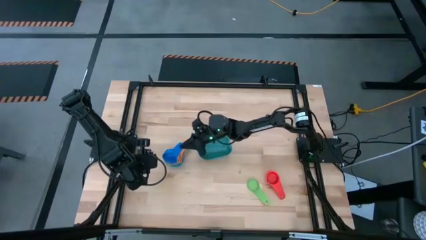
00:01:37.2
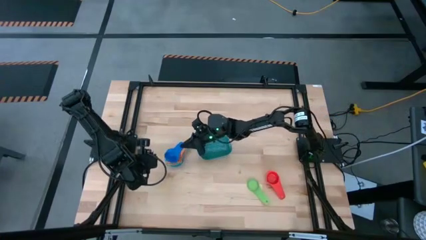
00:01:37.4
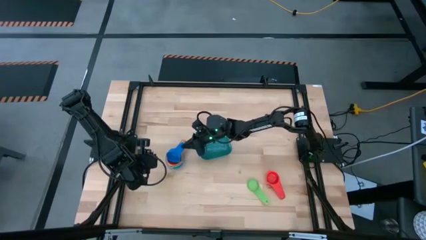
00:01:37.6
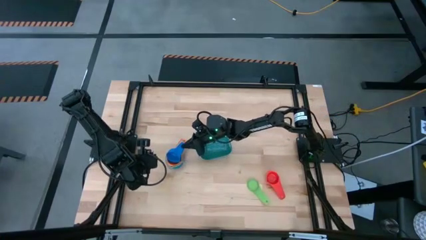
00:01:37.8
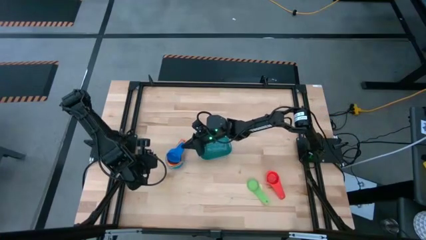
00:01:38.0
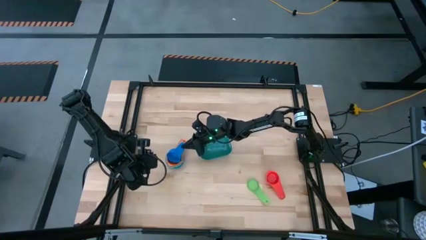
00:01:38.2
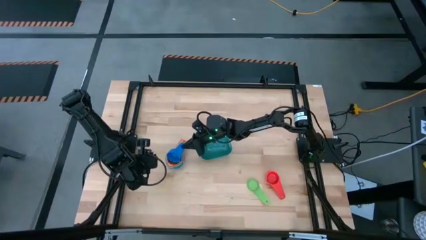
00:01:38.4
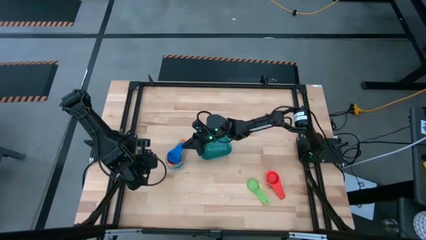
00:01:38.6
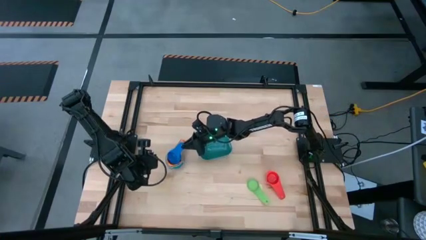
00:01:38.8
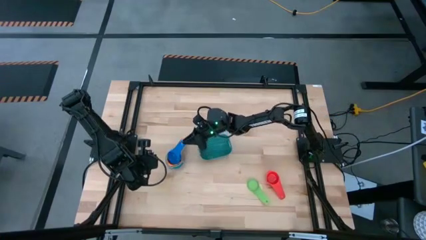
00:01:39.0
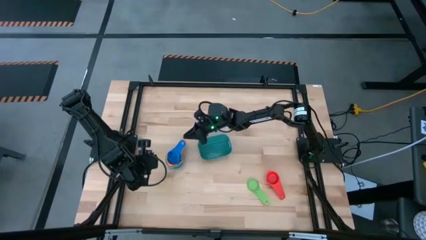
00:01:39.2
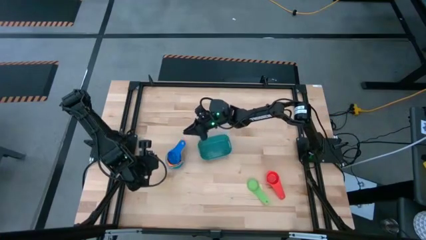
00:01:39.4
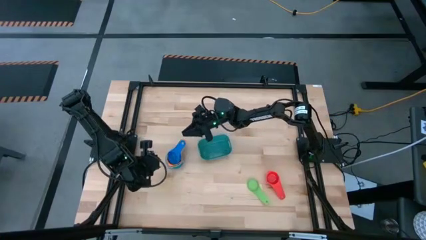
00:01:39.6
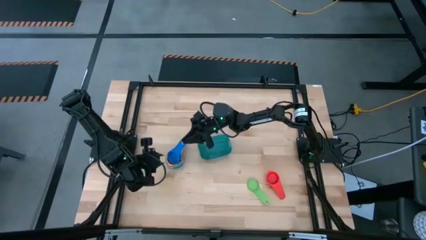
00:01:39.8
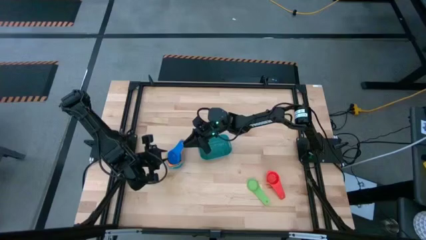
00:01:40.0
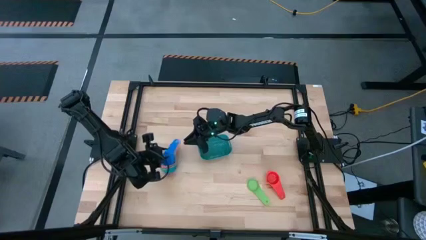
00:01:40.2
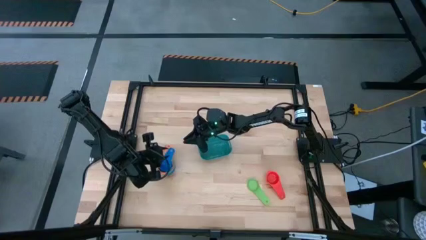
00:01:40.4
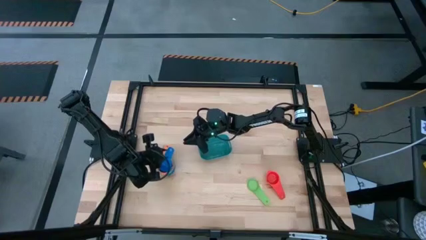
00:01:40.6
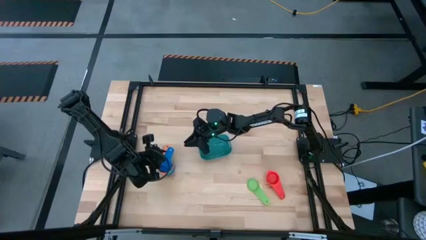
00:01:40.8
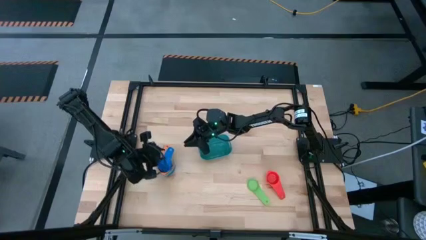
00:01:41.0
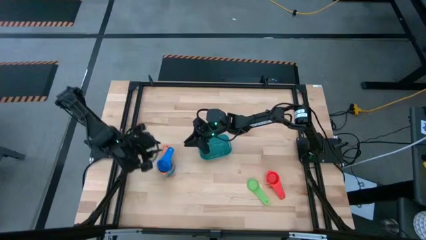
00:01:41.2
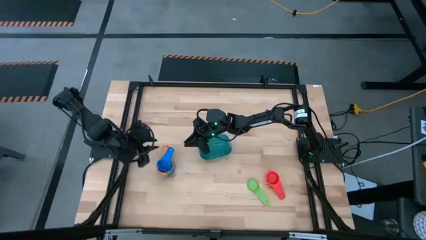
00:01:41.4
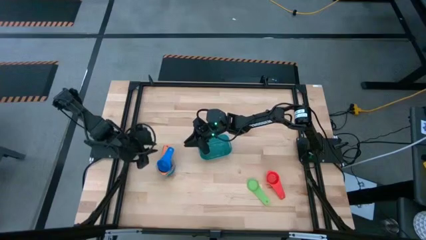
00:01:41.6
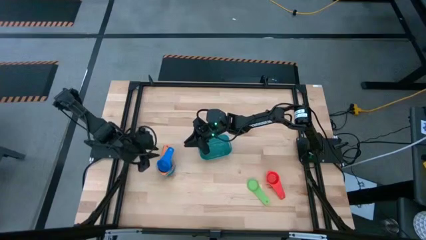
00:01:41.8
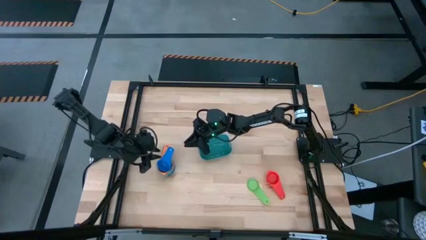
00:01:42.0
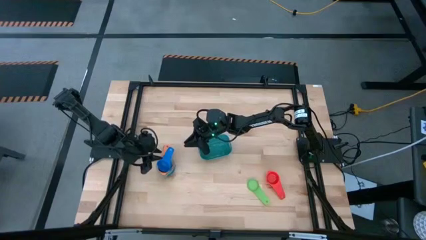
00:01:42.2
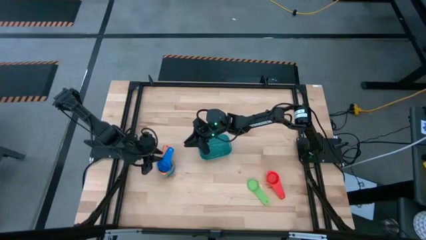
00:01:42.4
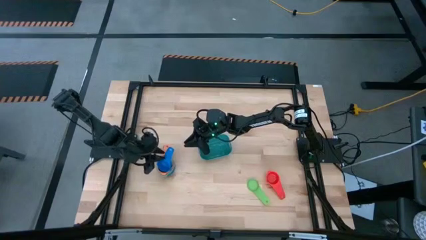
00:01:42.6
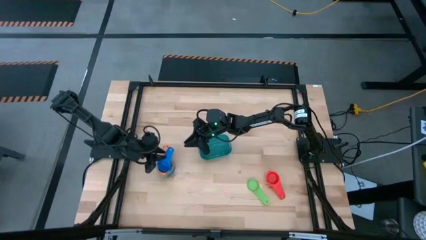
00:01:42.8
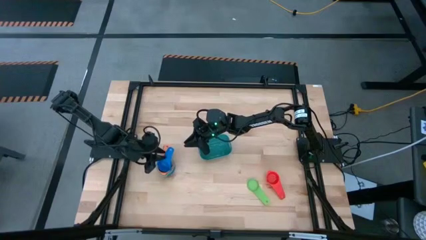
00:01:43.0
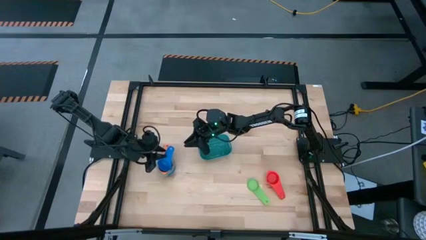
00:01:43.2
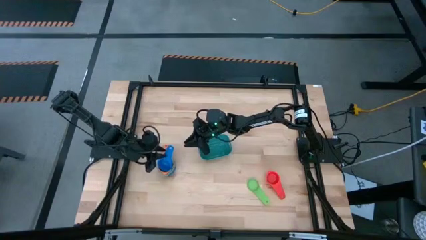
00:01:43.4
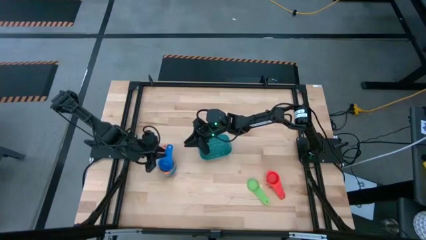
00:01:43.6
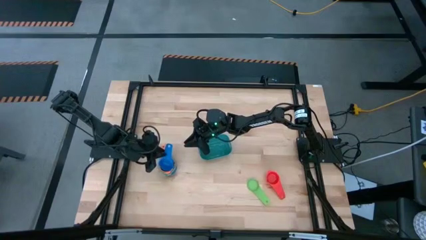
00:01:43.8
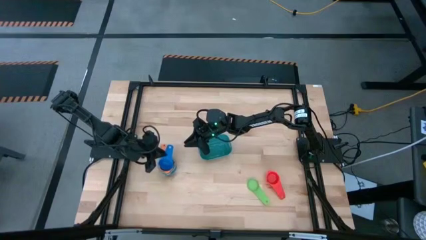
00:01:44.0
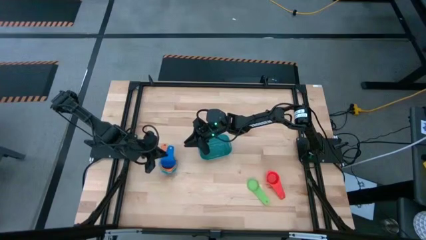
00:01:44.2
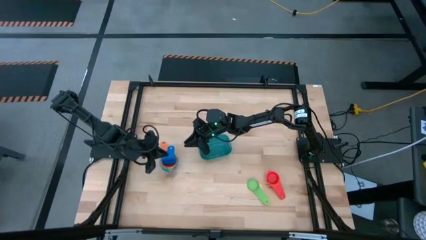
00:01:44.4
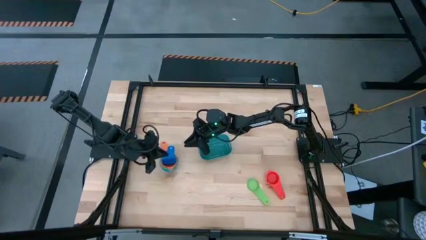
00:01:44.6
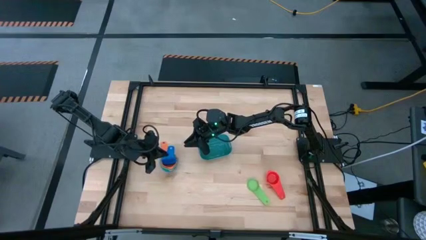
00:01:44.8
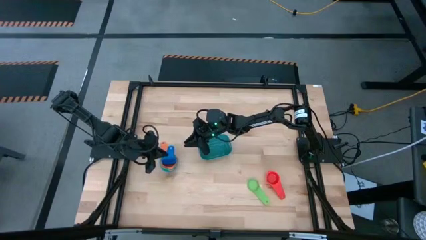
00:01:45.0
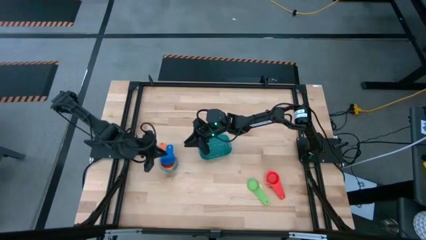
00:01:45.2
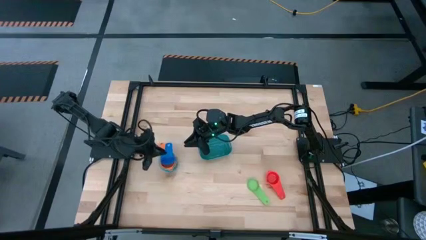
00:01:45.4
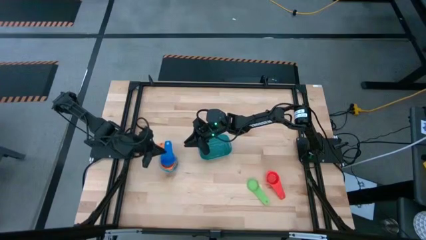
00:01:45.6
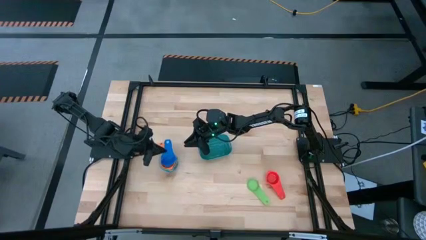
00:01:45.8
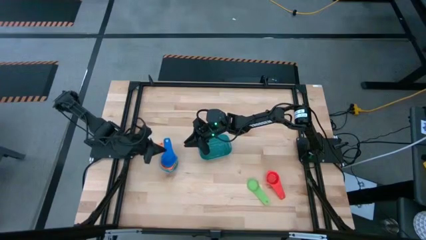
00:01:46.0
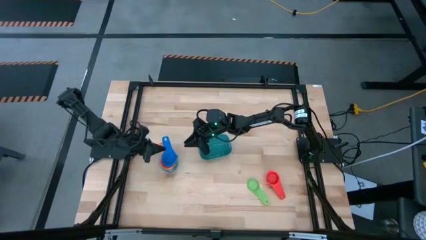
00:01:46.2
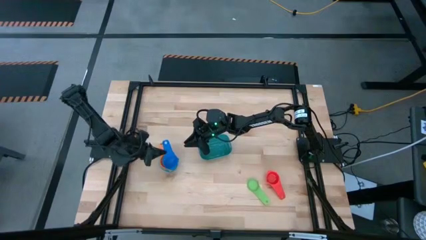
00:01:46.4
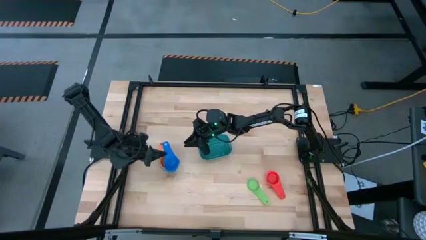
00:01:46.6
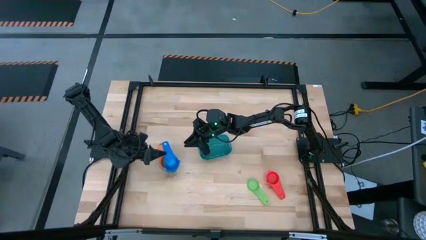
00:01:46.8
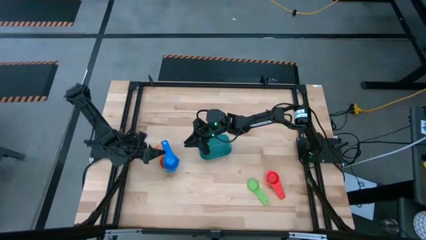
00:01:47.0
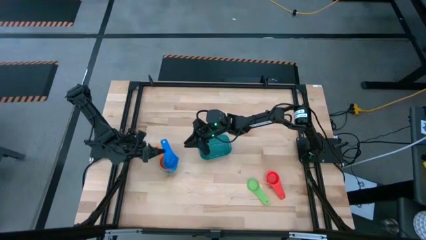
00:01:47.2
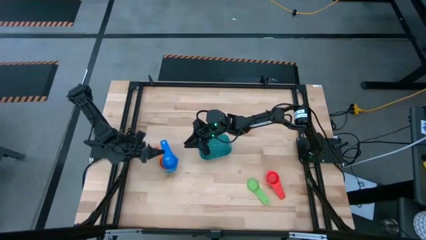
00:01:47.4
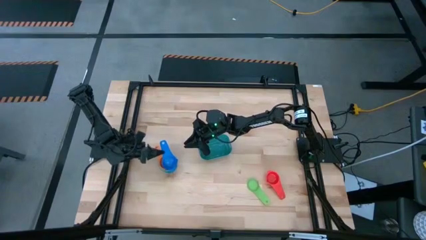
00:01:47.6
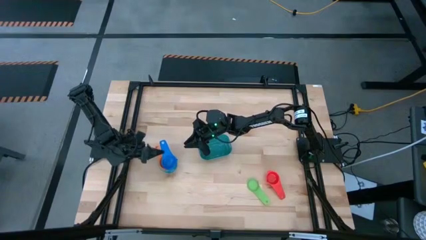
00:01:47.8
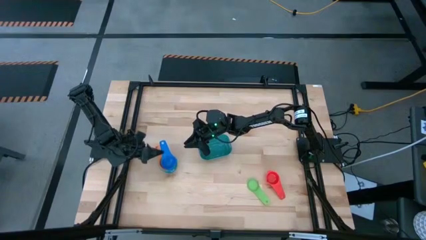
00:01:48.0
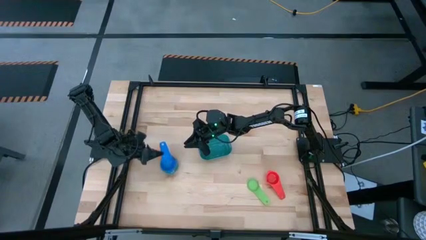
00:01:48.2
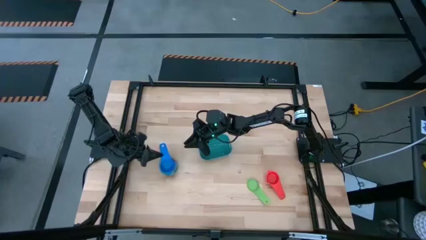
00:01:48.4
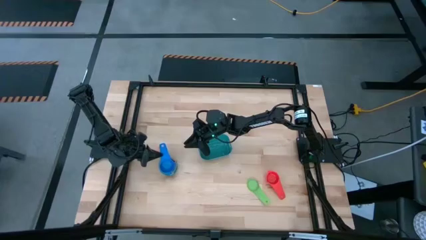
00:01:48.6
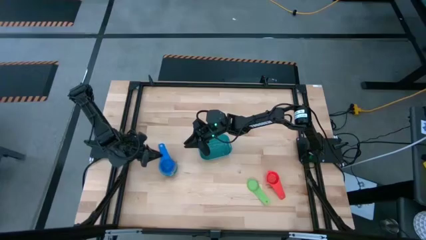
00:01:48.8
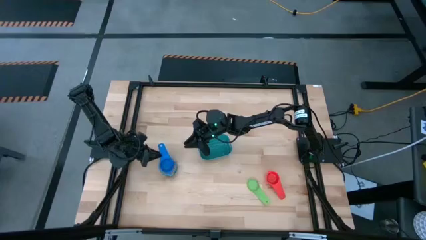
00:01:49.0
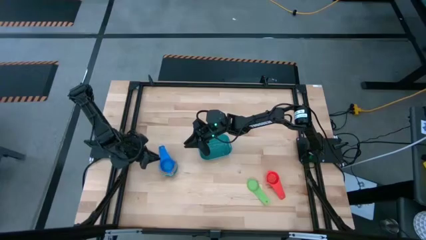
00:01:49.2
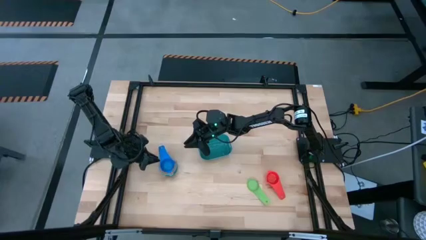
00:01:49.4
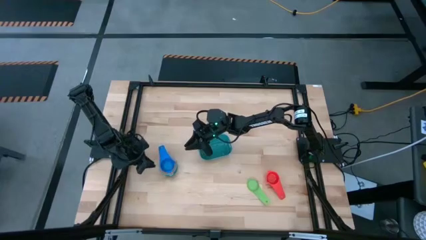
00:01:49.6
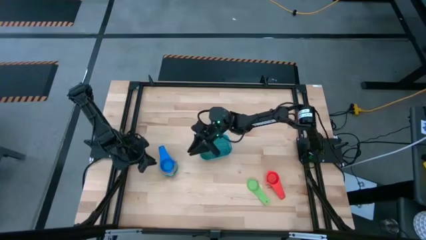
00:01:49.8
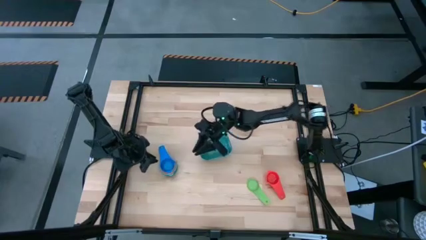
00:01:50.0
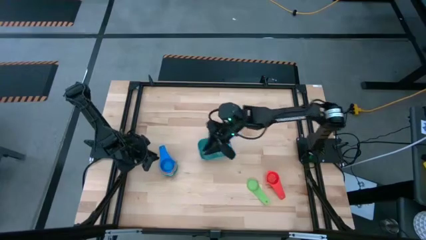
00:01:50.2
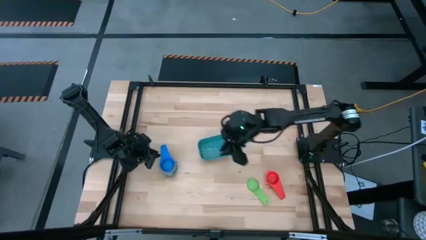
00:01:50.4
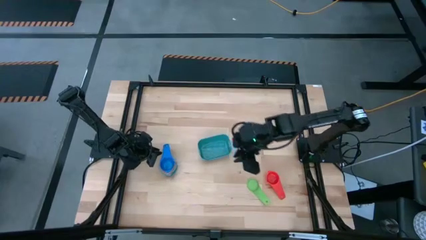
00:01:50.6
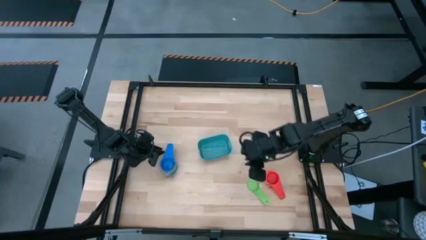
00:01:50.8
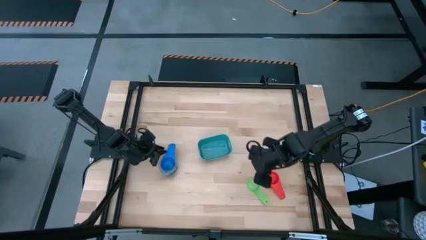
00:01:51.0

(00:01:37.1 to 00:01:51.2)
Task: Nest measuring cups in basket
Stack the blue measuring cup on top of the orange measuring cup

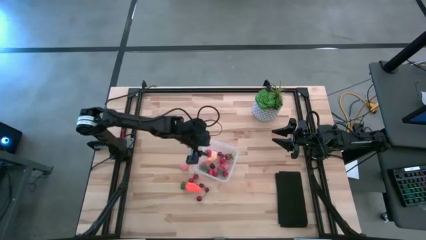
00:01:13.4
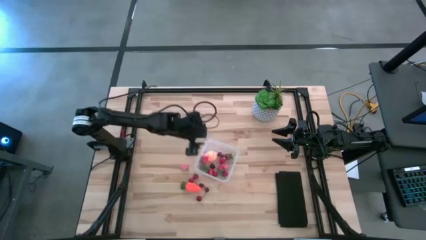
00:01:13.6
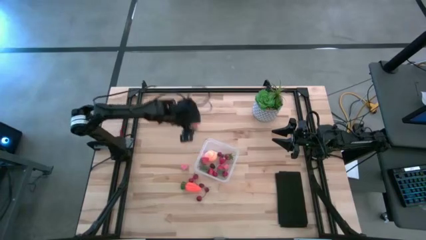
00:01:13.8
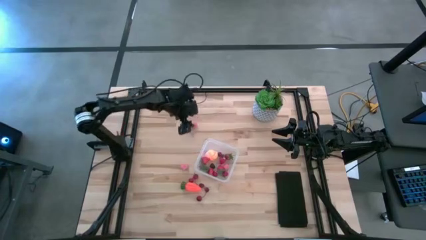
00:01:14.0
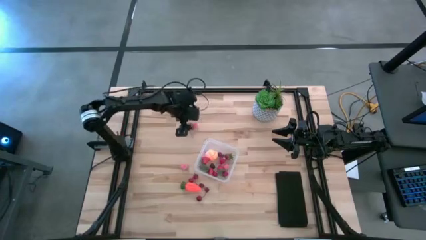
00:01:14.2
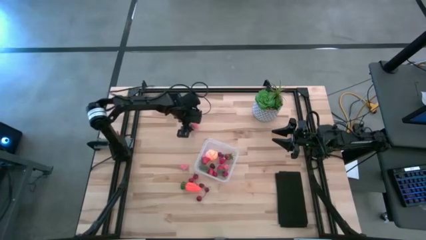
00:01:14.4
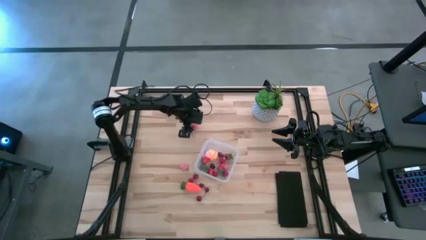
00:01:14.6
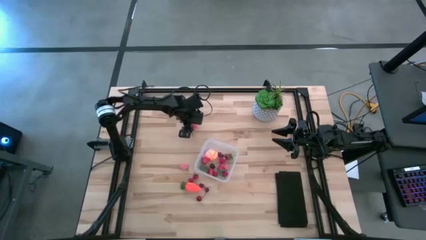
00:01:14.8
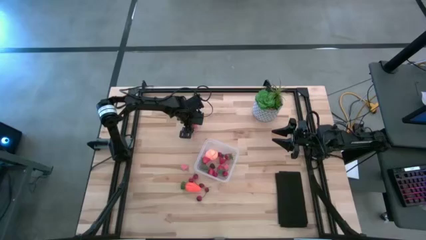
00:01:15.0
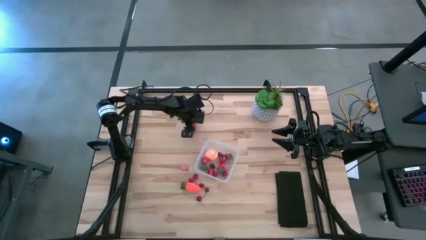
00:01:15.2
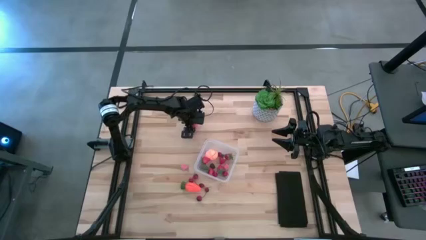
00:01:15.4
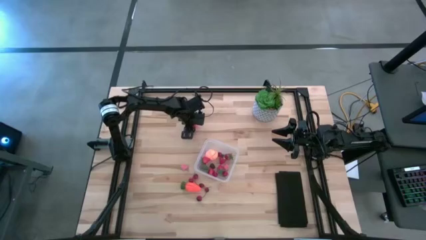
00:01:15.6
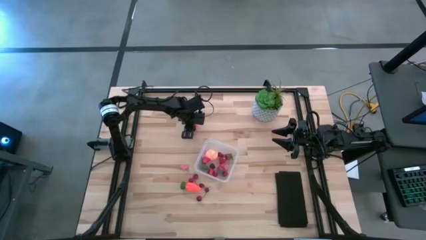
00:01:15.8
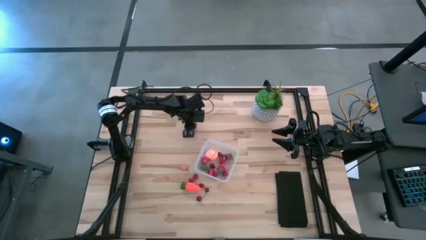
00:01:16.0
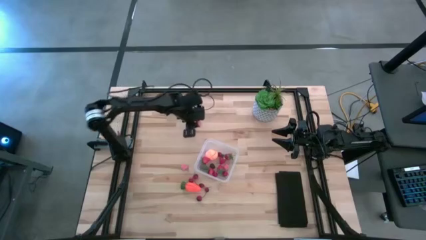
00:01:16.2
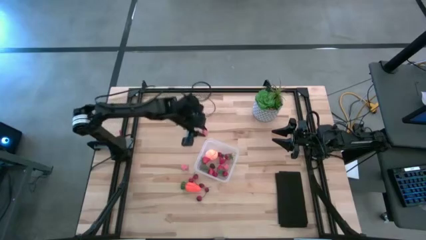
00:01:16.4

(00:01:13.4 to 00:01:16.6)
Task: Pick and placing Produce into tupperware
Put the pink peach into the transparent container
